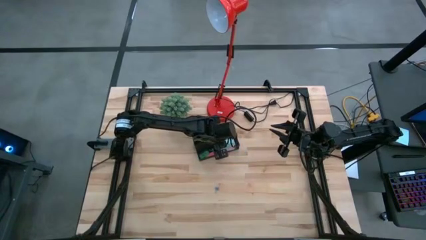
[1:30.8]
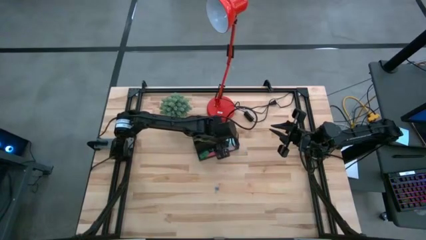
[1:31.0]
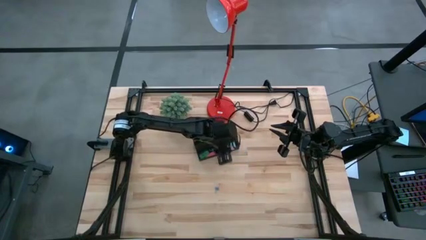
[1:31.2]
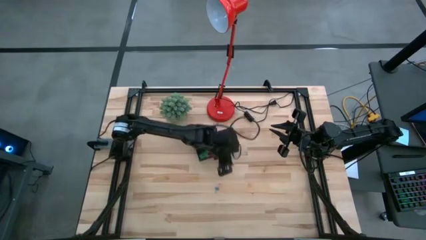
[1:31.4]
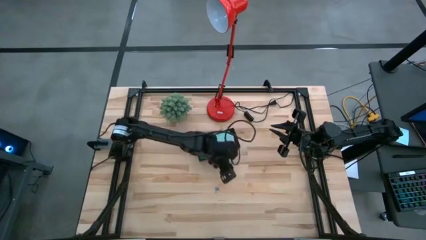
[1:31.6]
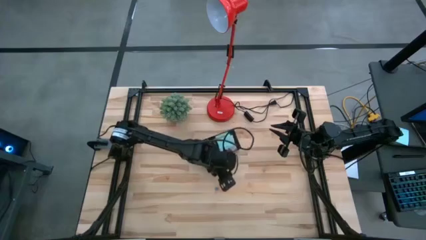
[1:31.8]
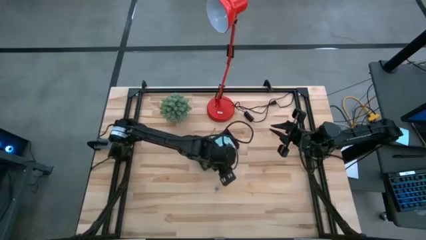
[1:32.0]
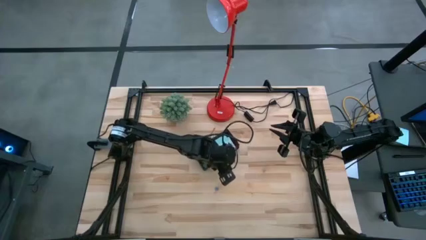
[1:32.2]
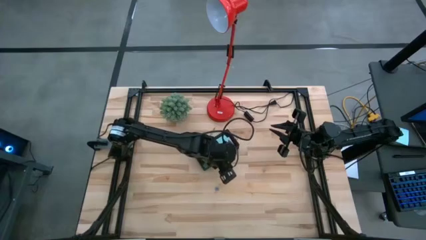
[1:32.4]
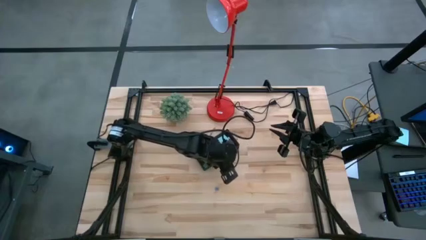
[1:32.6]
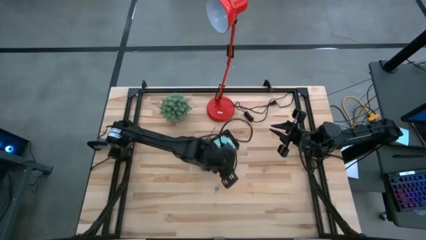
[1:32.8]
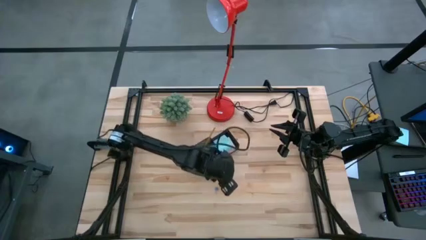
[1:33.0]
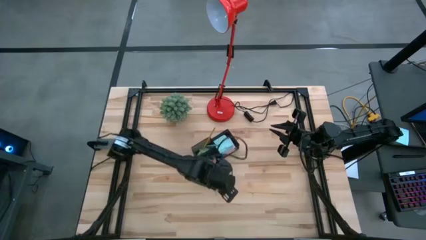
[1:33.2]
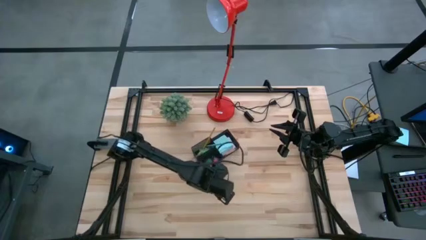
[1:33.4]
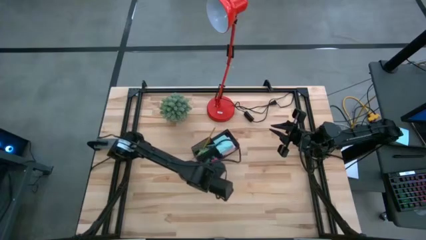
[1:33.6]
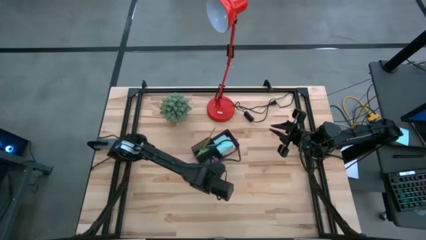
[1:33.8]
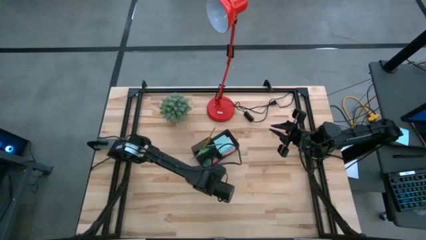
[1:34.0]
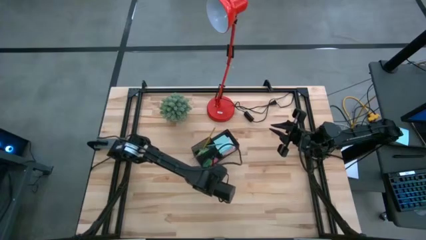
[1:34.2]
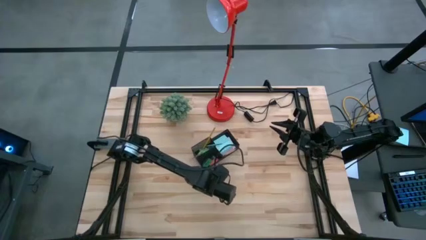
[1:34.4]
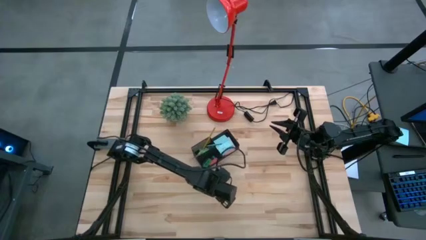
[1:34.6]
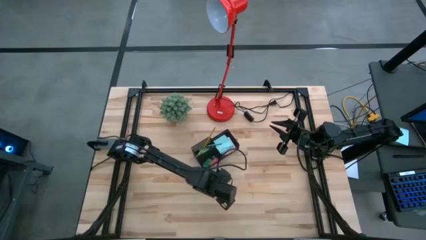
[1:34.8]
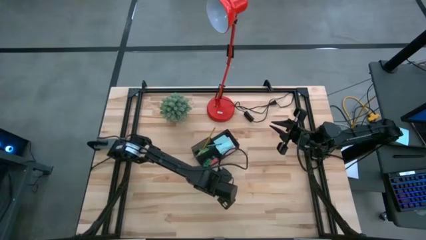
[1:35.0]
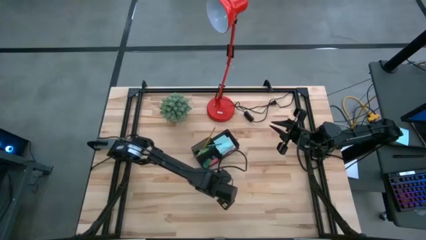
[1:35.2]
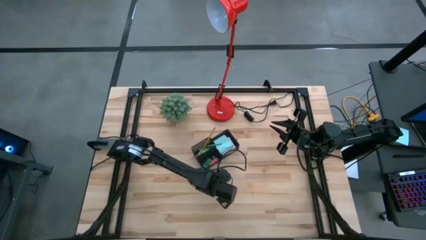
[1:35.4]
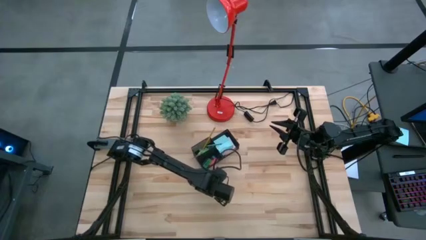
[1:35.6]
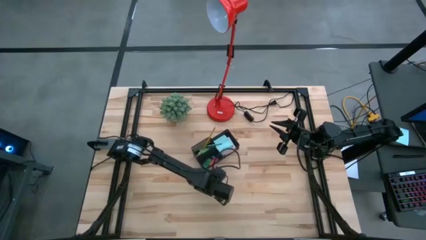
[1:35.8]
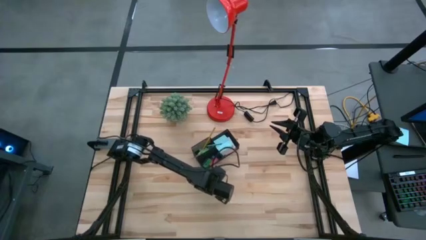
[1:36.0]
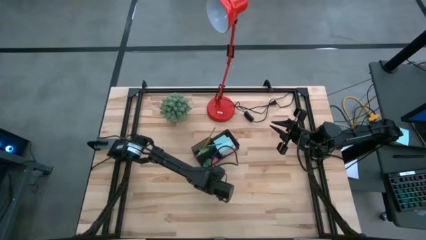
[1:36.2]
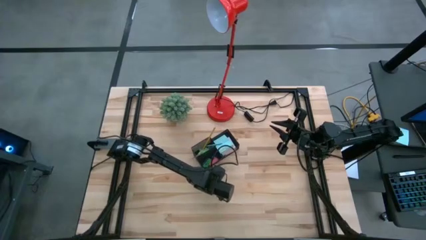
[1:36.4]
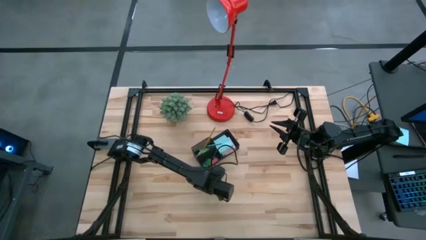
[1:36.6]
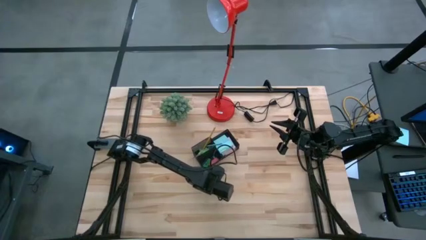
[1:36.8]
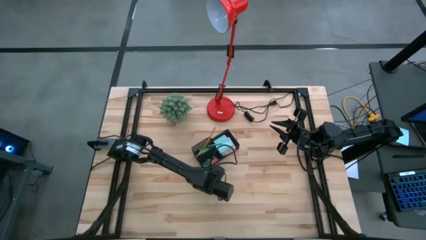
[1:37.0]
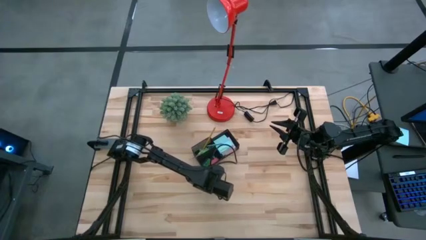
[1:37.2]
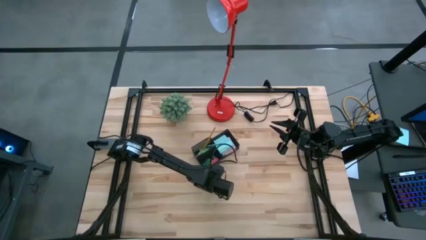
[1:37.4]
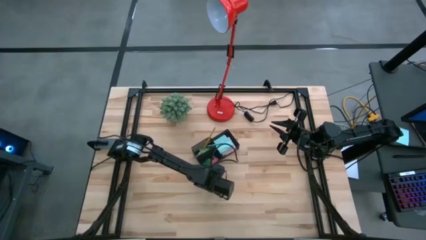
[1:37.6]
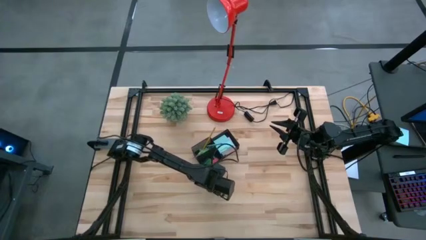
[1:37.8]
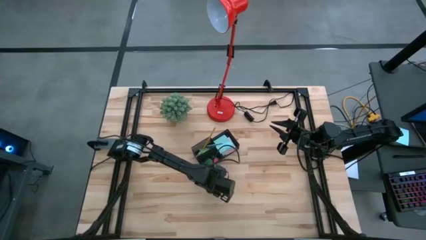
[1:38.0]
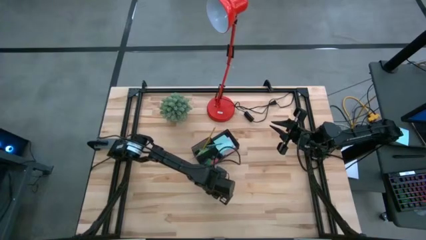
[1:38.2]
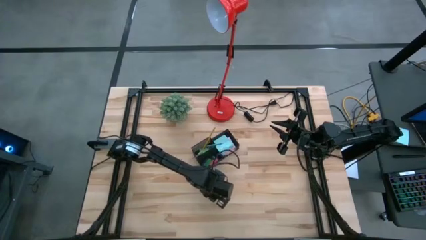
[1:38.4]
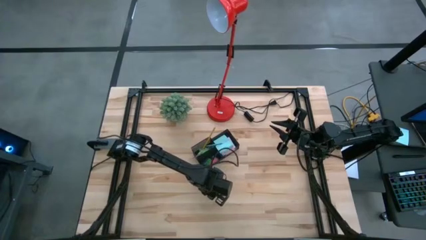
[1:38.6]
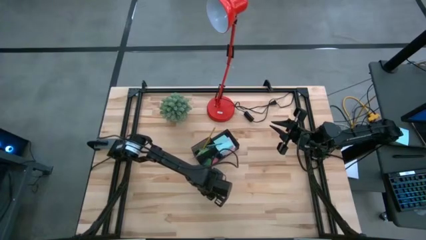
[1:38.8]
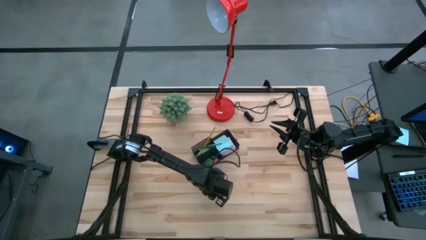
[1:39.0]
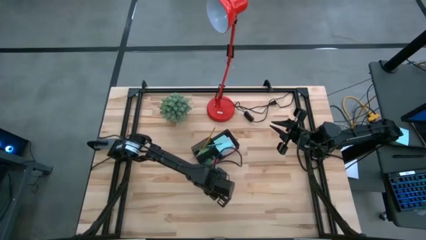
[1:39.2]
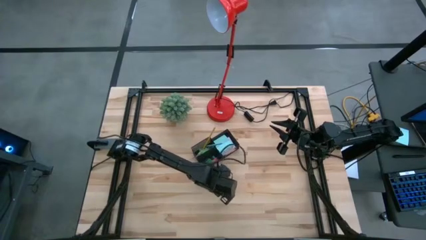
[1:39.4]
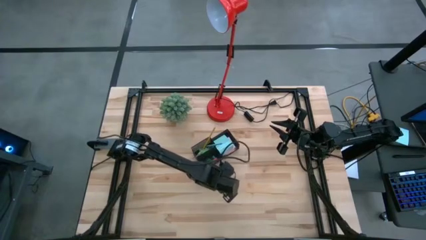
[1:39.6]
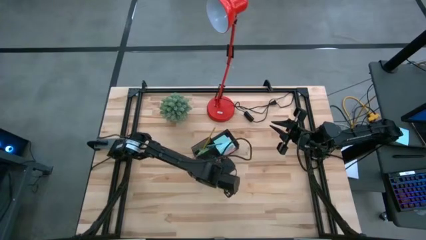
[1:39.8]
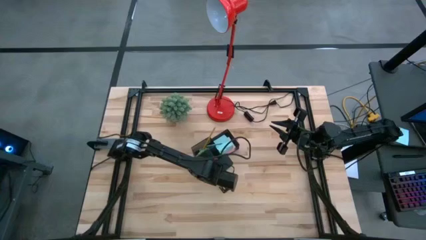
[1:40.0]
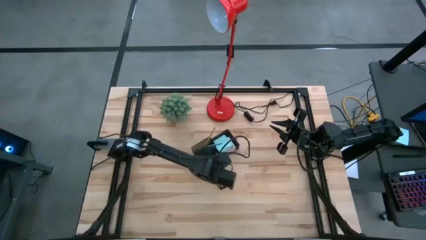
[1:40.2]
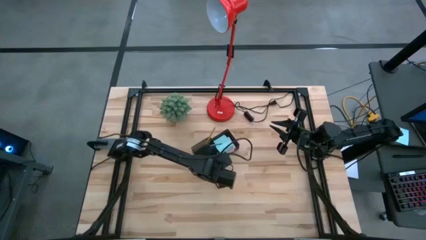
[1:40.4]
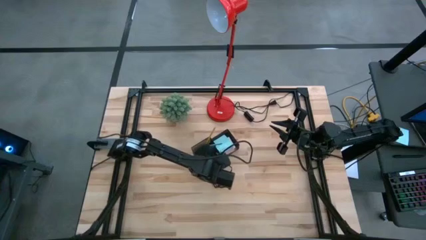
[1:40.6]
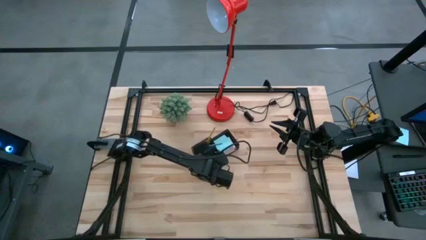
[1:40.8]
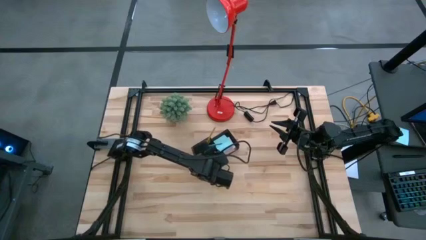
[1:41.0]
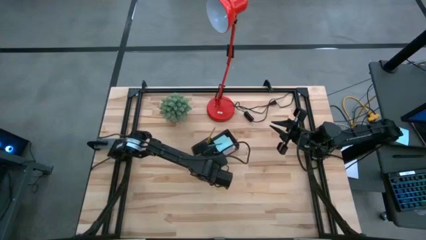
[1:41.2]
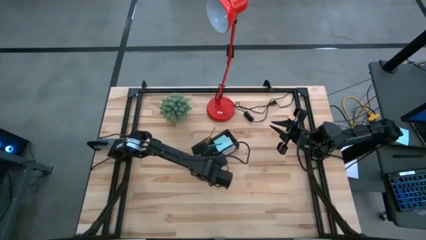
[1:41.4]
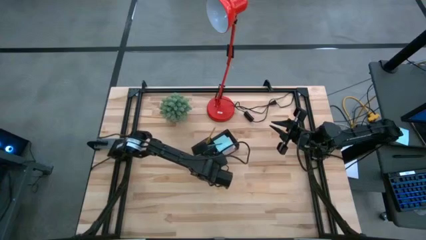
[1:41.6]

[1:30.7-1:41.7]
Task: Pick and place office supplies into organizer
Put the blue binder clip into the black desk organizer

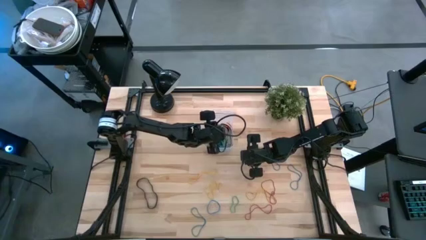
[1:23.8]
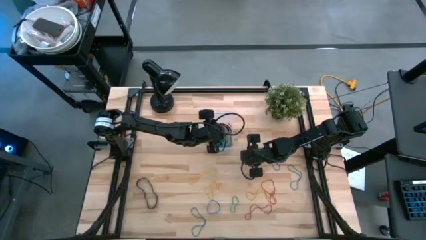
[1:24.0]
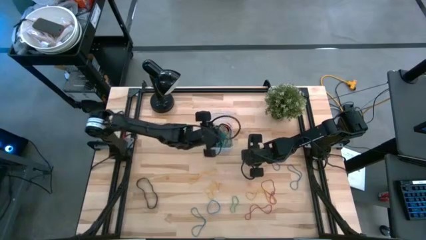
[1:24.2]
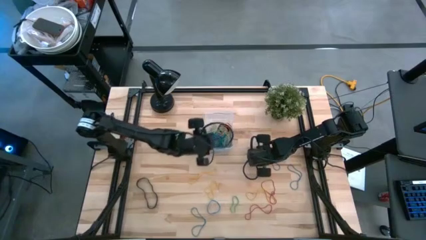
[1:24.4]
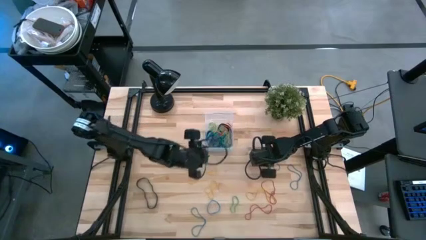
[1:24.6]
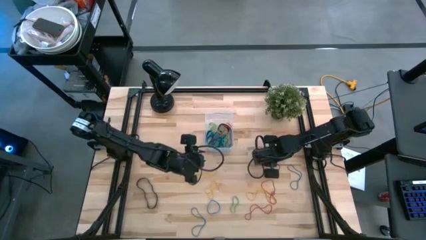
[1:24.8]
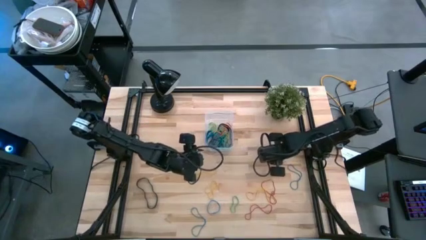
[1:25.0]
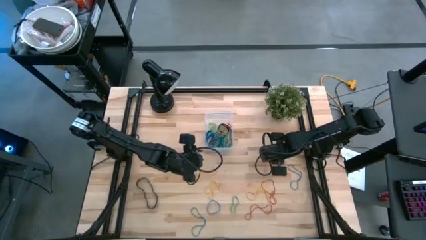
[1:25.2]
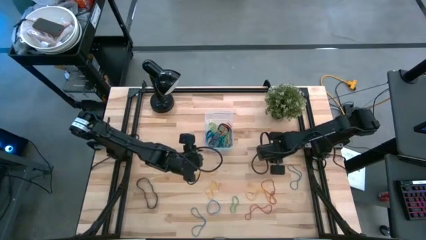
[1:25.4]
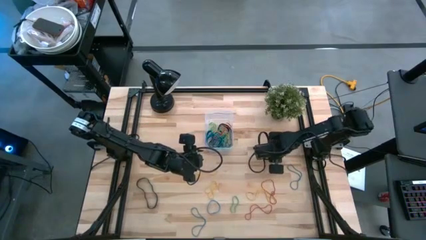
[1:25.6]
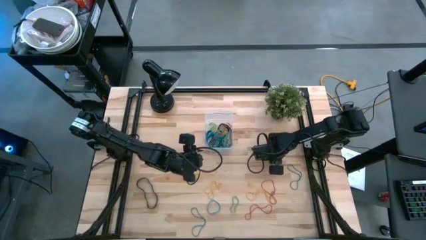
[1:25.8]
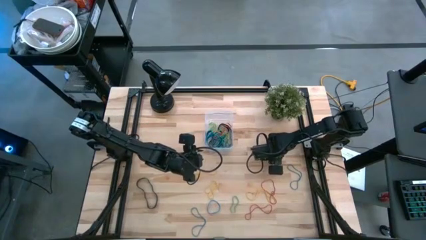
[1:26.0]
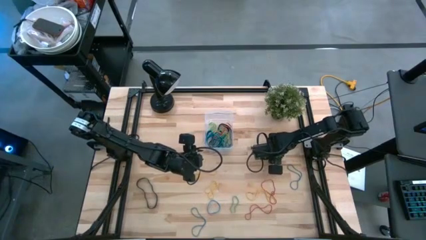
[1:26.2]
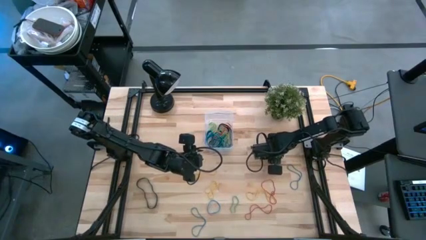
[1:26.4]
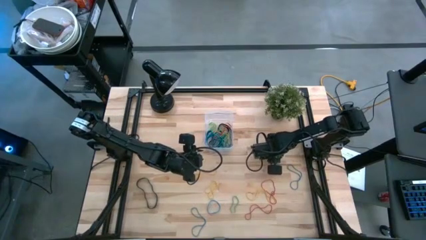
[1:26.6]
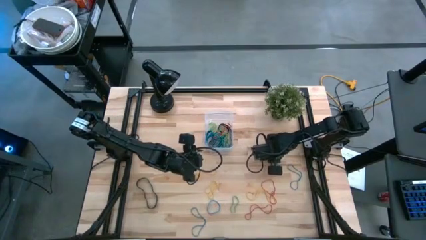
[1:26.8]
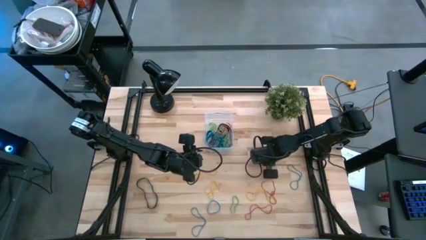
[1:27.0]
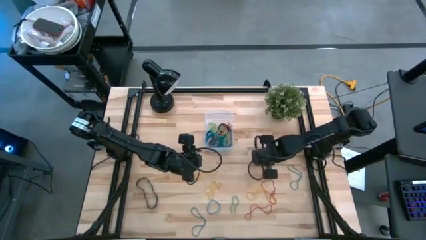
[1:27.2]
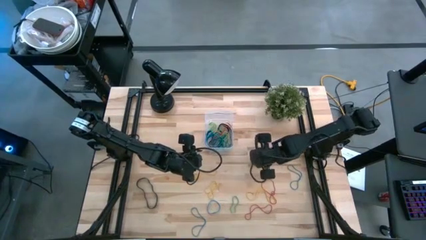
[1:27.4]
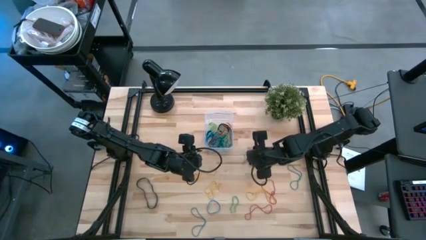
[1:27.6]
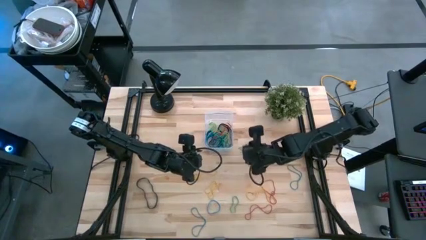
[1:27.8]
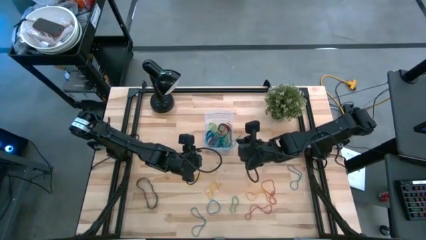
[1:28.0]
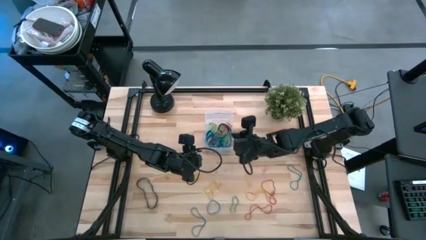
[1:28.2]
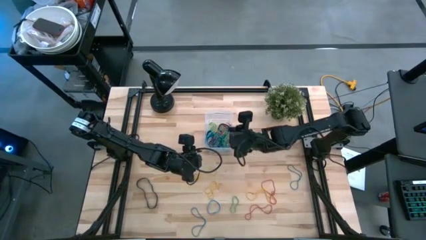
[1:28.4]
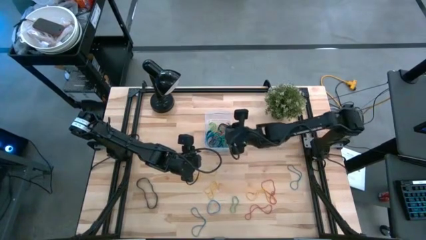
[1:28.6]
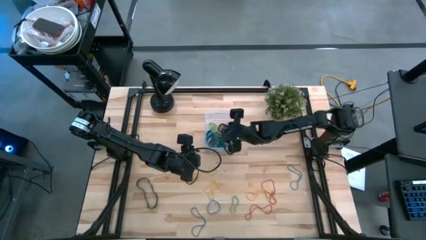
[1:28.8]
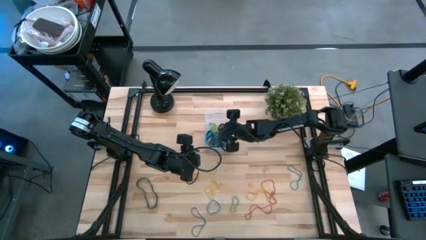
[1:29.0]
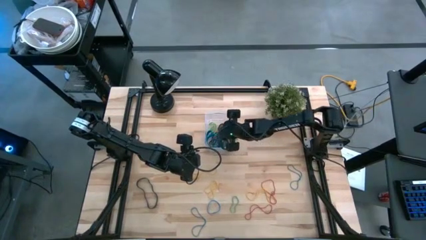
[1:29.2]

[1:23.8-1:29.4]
Task: Pick and place rubber bands into bin
Put blue rubberband into the transparent bin
